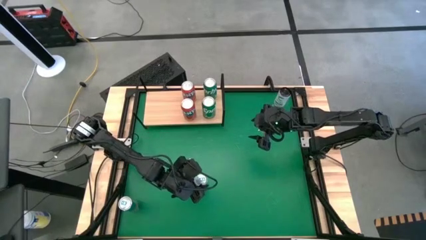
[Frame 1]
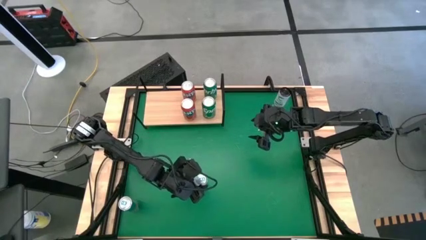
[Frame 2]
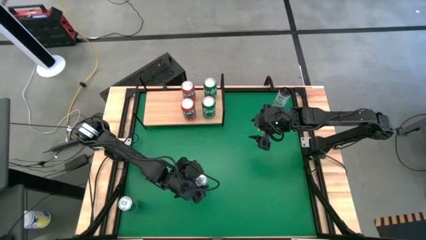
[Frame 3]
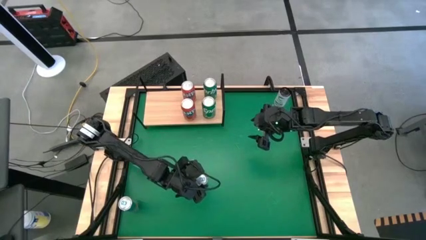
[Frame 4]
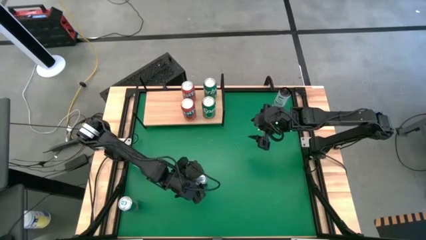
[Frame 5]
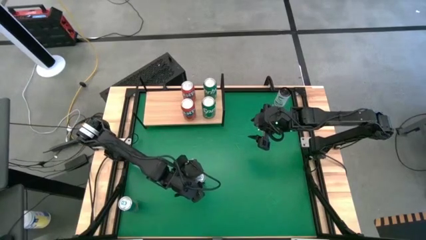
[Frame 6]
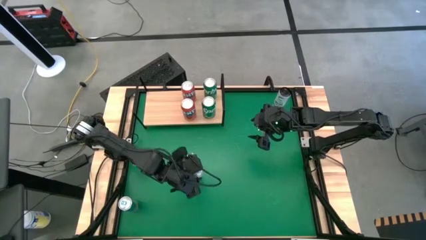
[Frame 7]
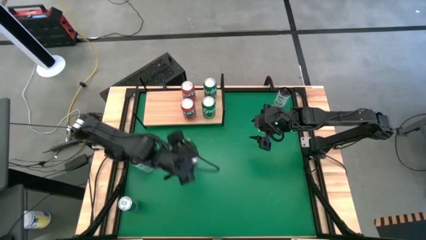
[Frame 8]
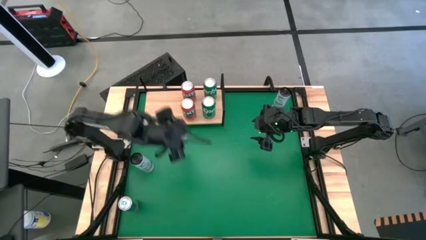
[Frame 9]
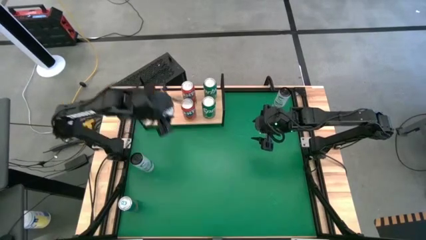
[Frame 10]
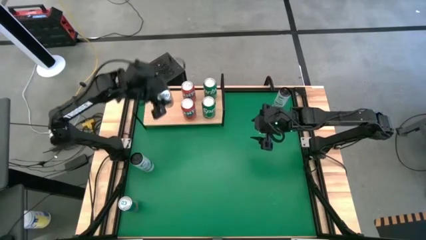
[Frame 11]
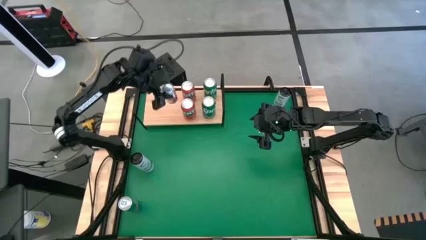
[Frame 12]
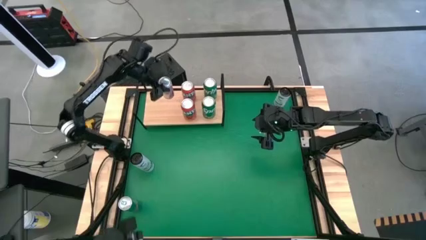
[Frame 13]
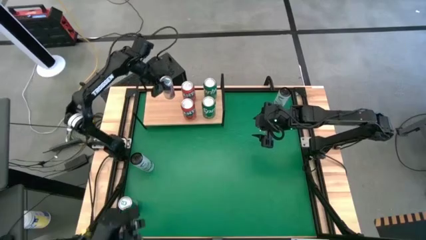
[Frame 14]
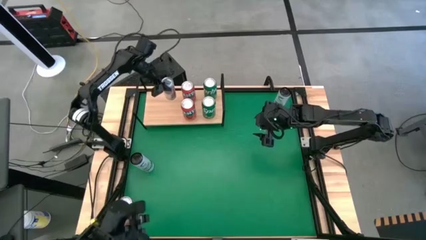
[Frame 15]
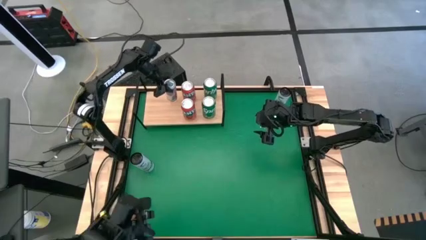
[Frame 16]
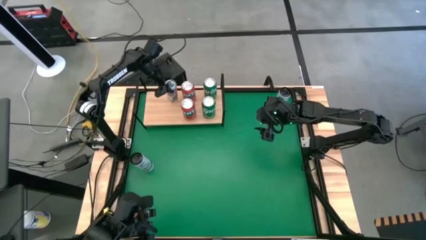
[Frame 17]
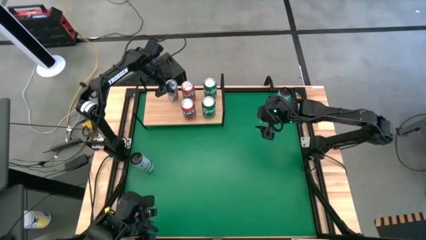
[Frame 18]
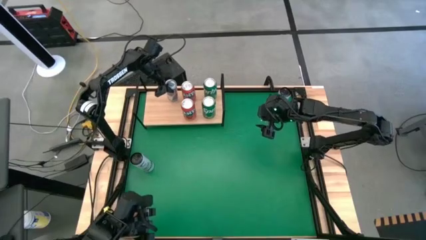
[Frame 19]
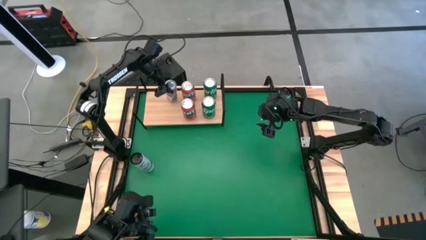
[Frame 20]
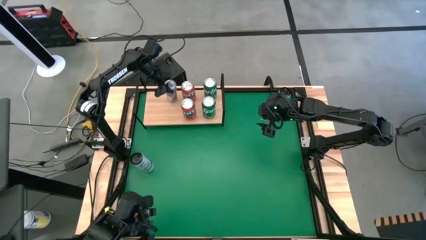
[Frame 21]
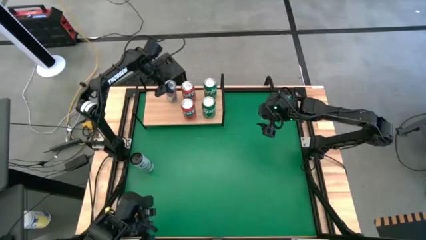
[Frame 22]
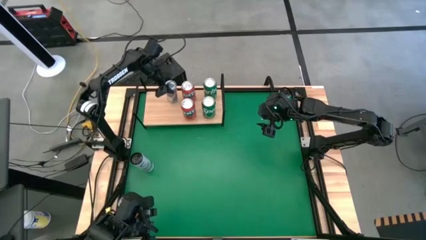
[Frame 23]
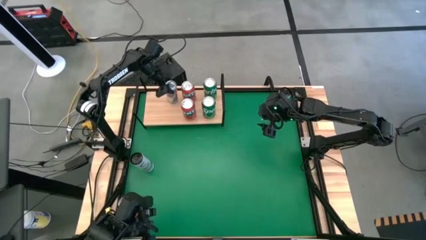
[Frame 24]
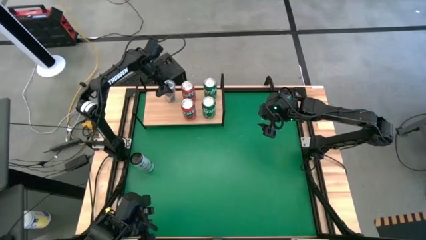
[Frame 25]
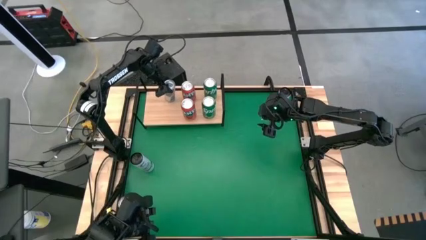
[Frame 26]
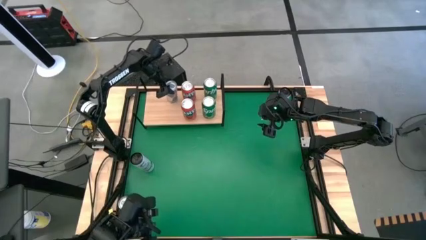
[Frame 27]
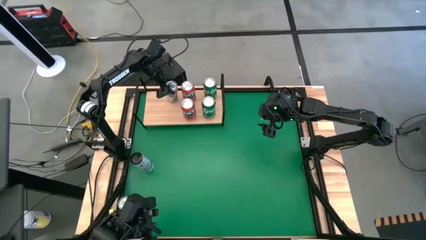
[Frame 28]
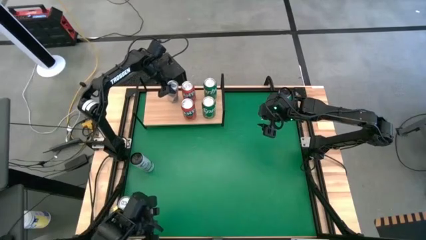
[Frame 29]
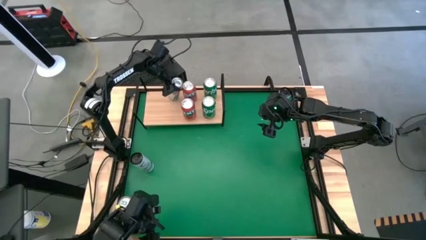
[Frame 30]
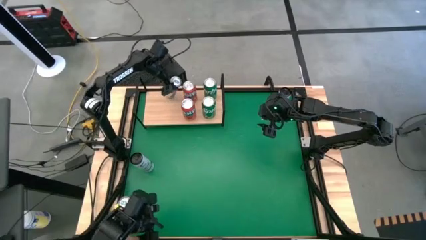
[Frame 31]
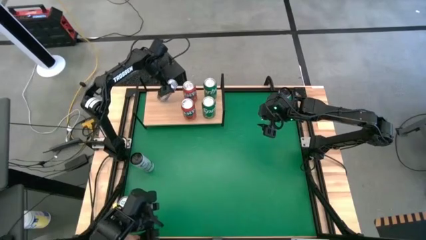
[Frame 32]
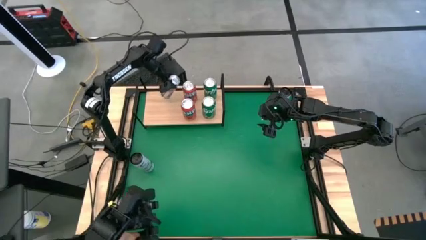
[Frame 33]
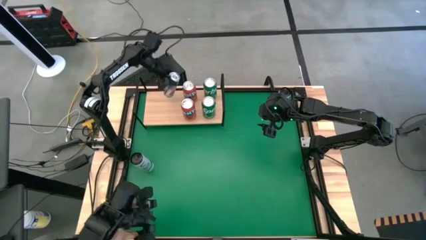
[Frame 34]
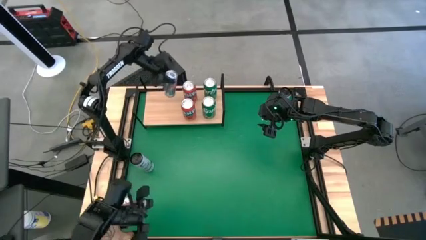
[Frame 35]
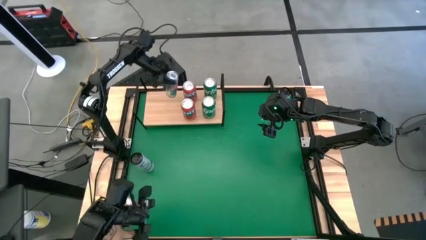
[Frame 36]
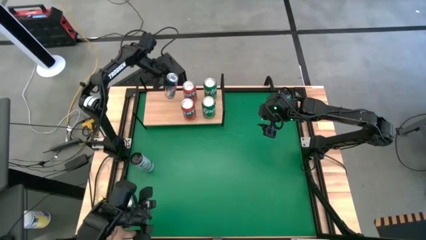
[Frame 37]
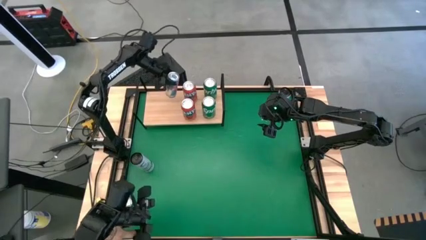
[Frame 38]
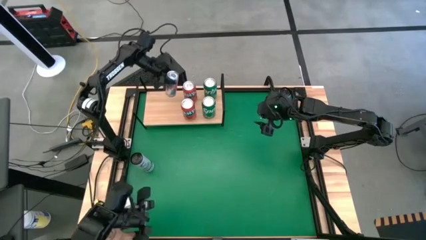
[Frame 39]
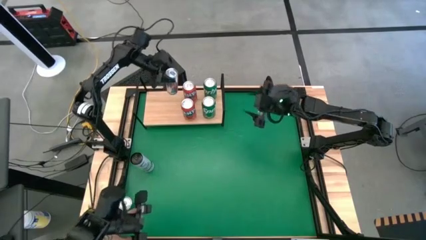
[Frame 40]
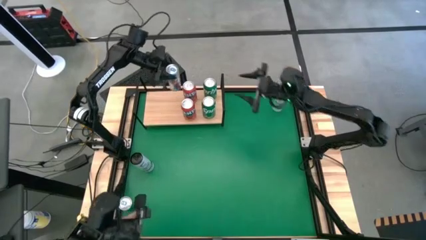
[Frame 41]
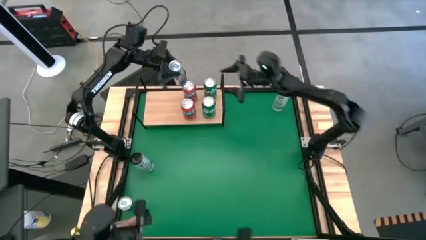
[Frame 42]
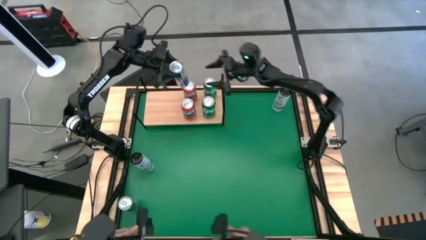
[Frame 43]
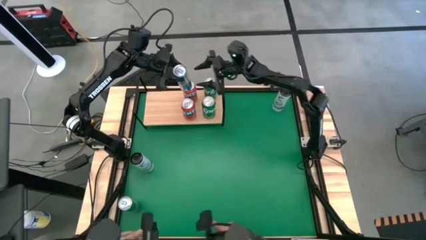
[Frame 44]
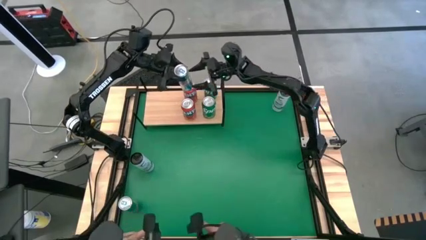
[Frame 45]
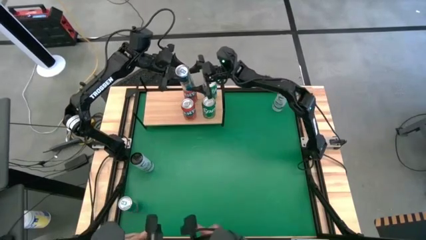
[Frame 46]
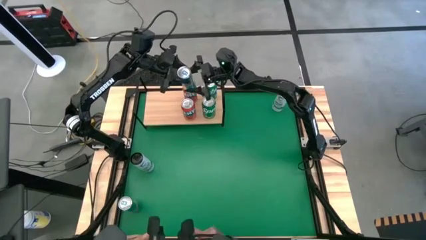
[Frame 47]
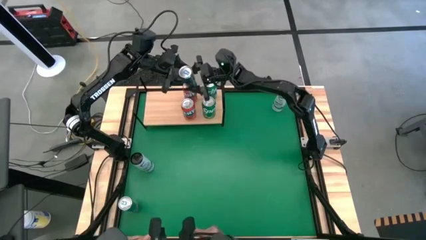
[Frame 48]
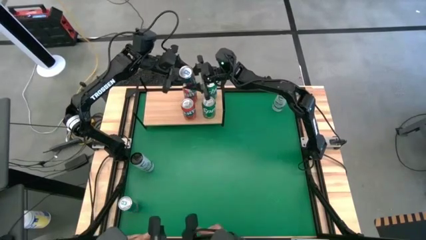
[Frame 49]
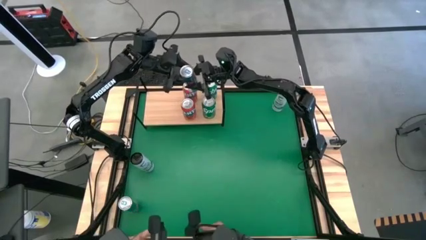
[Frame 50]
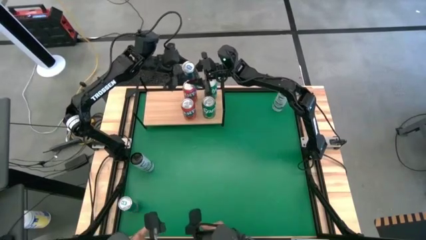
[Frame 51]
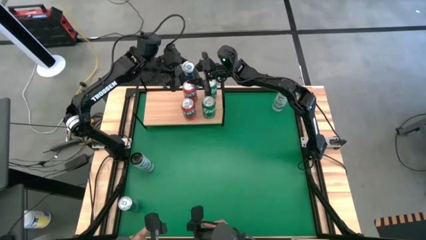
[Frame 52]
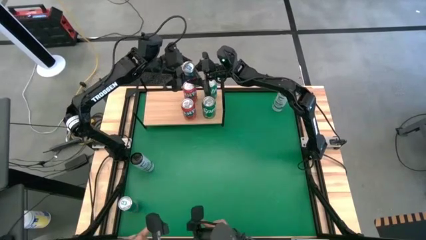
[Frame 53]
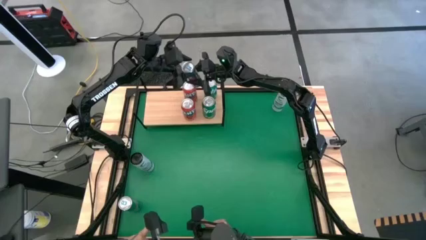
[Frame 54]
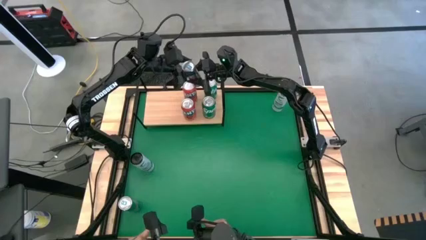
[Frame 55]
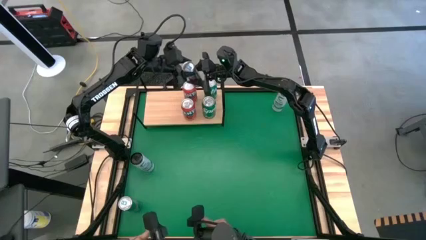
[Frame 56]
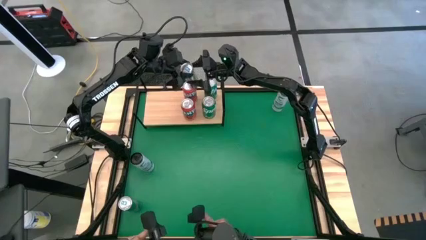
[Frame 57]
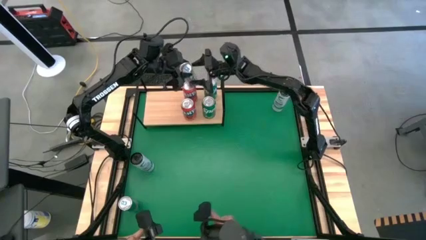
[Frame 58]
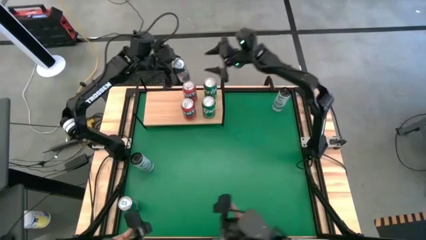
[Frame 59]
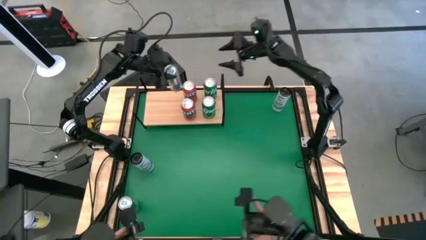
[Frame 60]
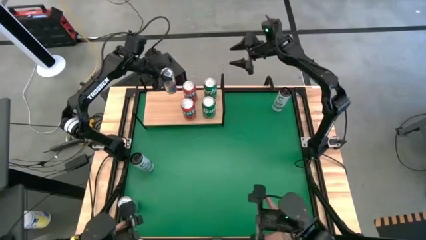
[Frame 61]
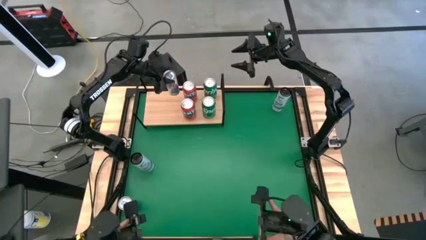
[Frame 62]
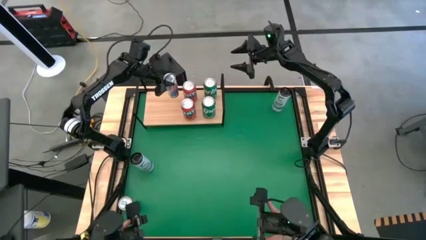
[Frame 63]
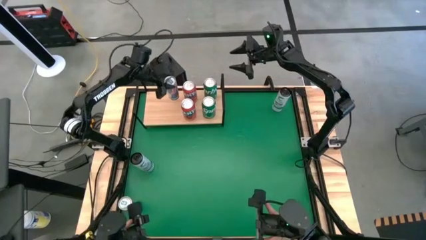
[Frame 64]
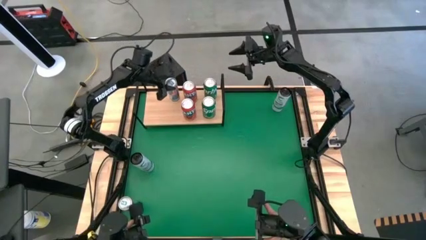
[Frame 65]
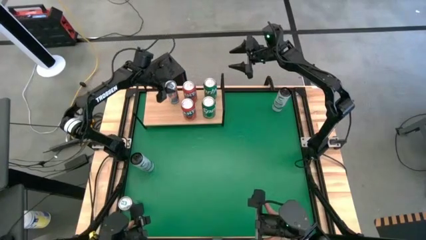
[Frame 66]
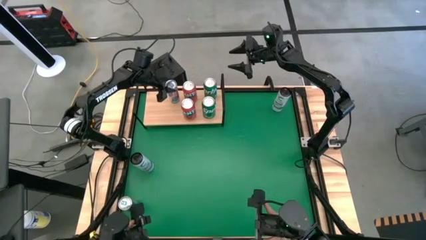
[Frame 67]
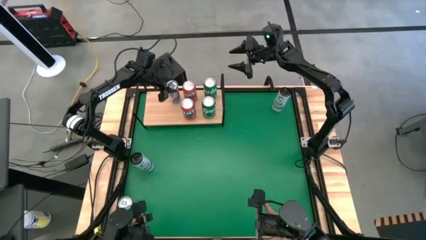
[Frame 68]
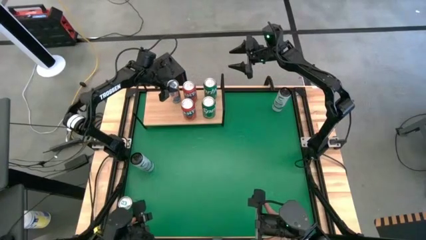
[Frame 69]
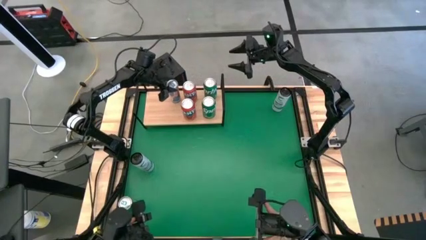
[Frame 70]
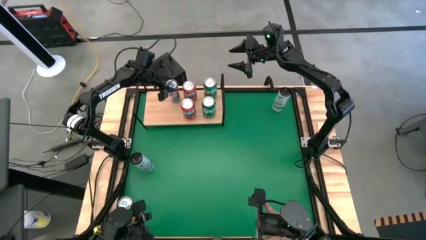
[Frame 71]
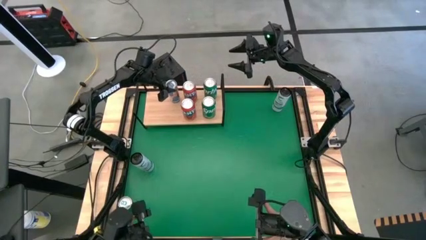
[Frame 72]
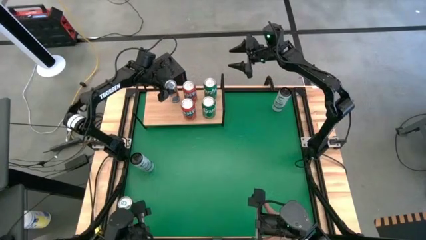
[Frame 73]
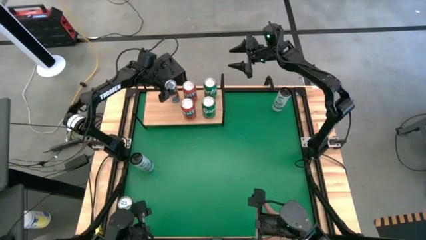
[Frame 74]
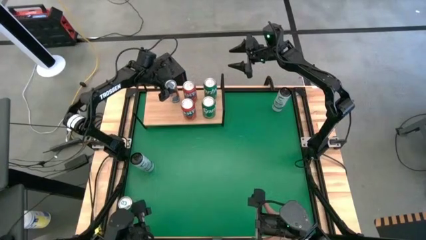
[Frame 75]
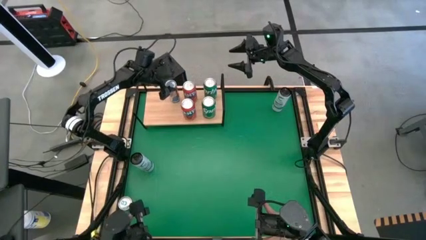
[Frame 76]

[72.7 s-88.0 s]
Task: Place canned beverage on shelf
Put the right blue soda can on the shelf

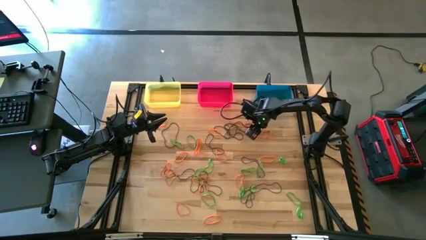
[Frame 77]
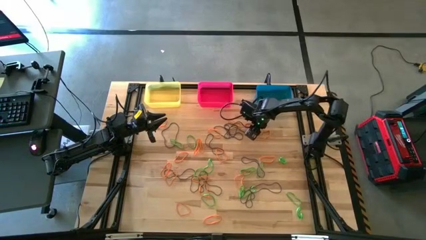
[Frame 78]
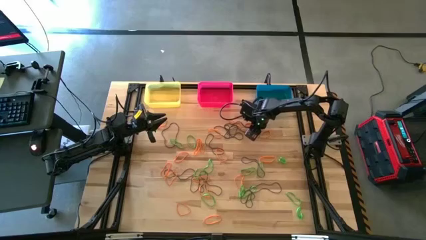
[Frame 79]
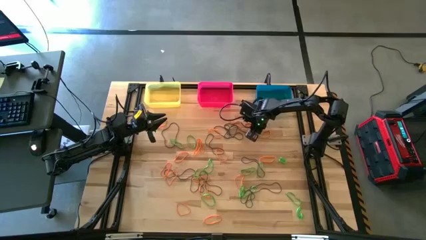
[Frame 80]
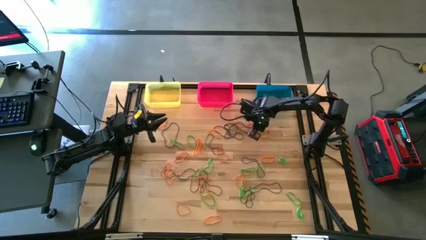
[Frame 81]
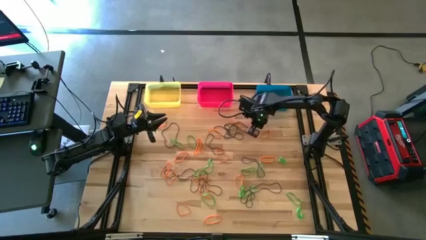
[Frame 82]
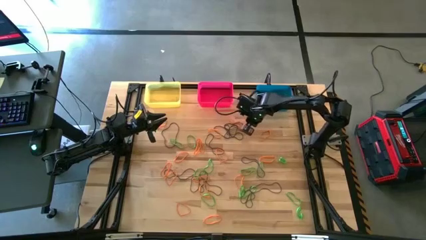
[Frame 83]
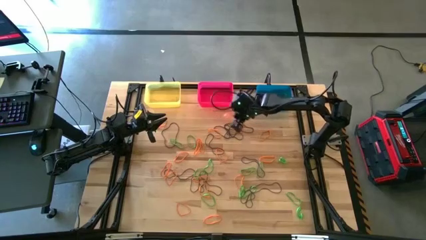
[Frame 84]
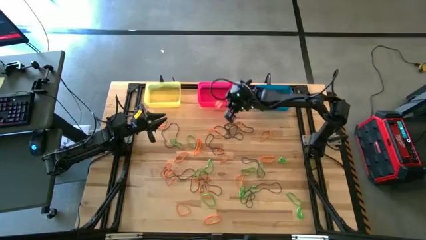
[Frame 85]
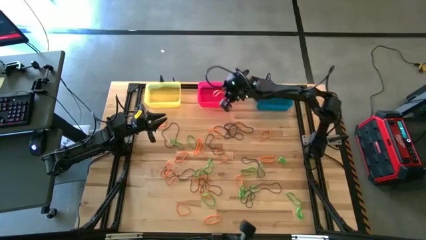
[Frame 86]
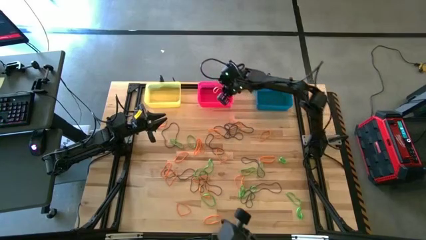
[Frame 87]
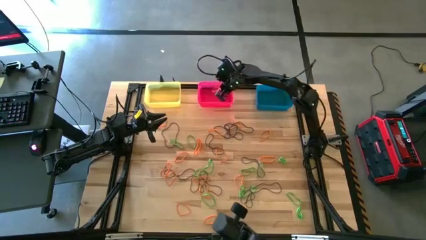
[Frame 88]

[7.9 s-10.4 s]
Task: Sort rubber bands into baskets
Put the orange rubber band into the pink bin
